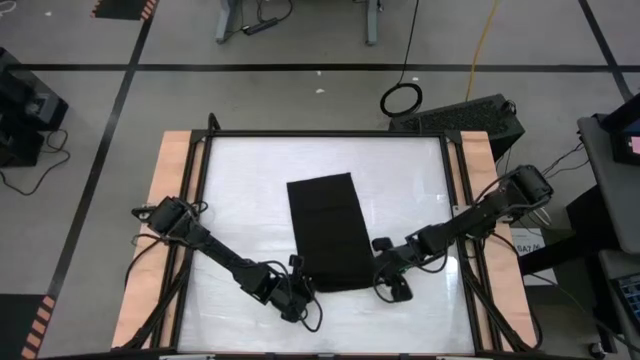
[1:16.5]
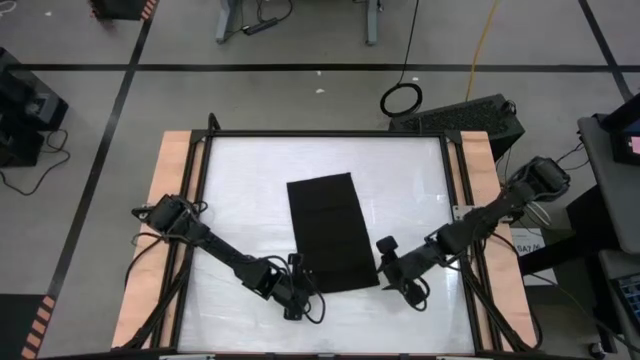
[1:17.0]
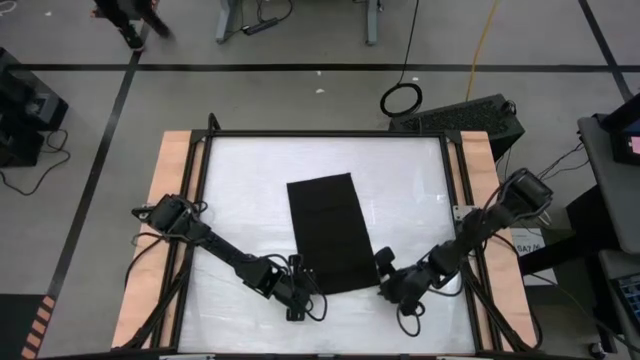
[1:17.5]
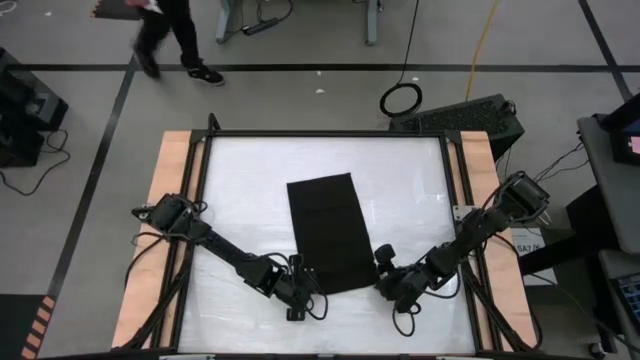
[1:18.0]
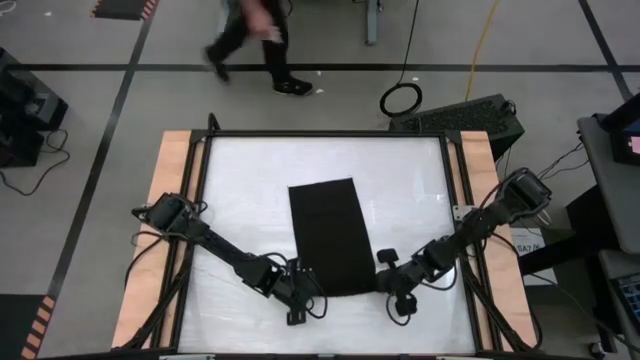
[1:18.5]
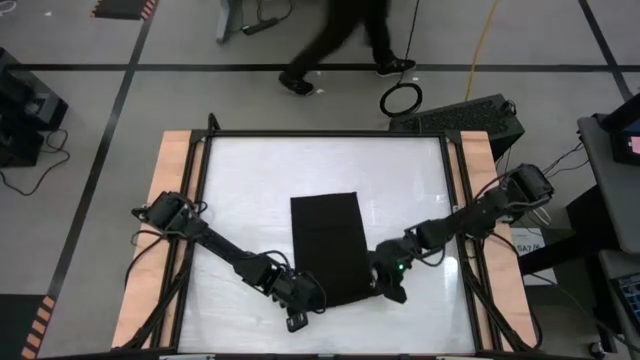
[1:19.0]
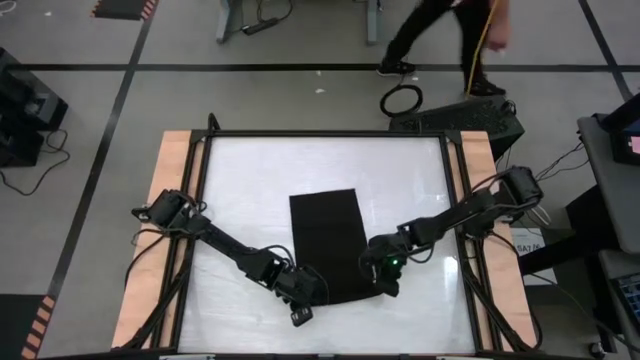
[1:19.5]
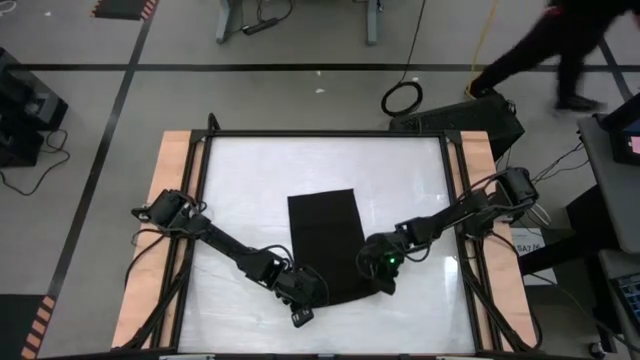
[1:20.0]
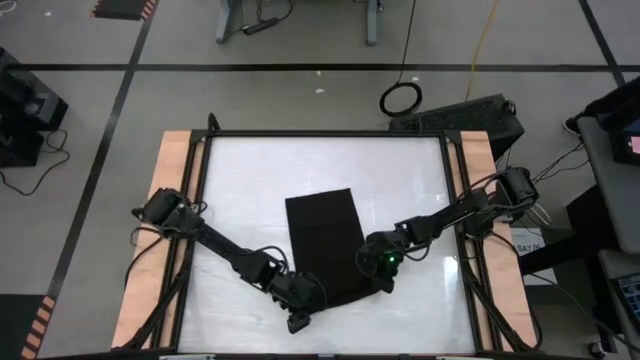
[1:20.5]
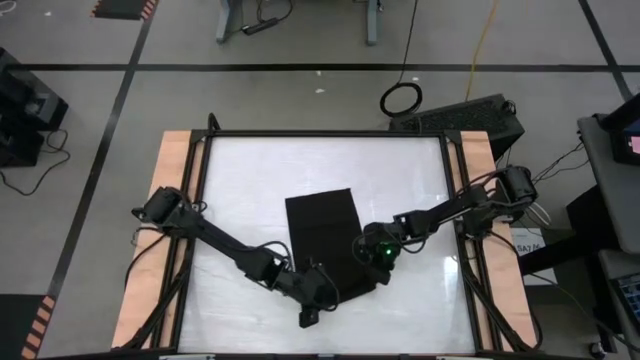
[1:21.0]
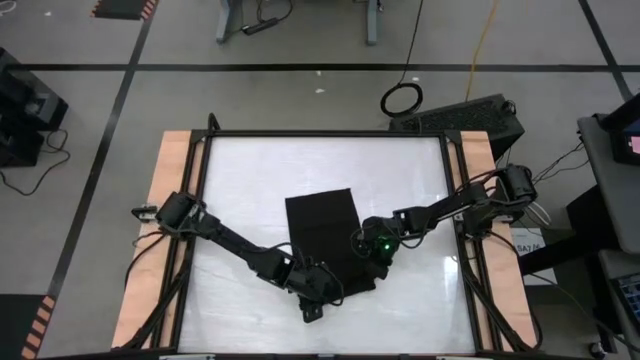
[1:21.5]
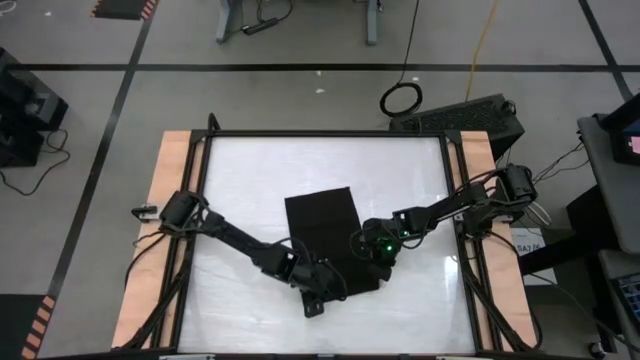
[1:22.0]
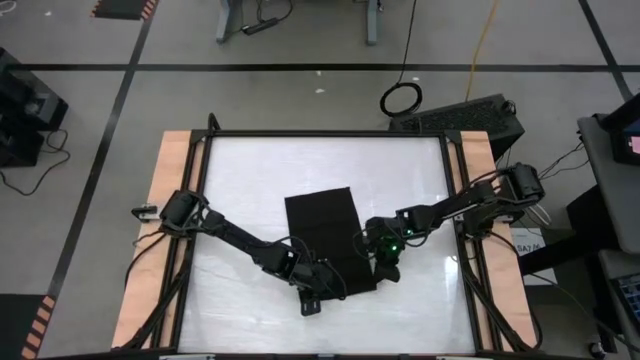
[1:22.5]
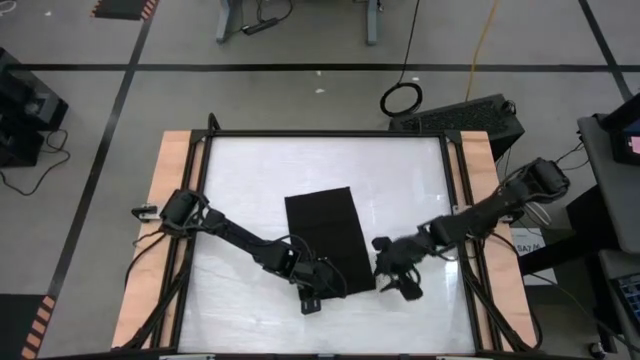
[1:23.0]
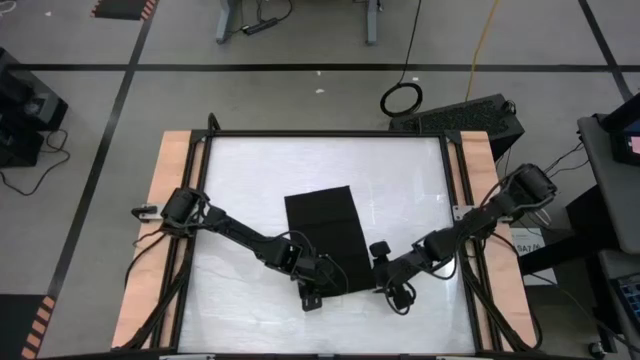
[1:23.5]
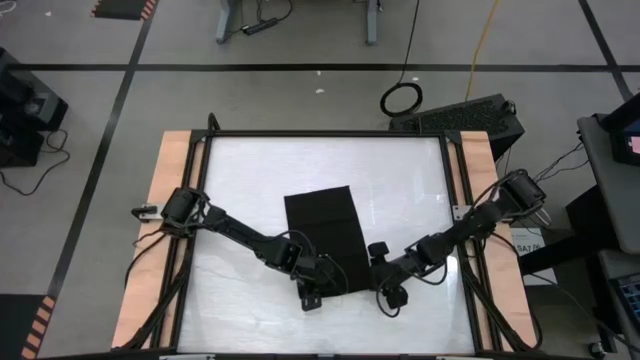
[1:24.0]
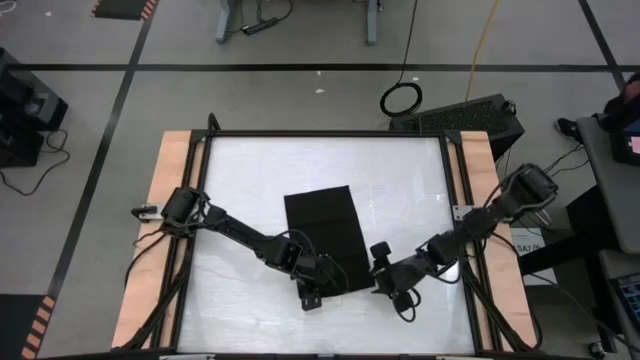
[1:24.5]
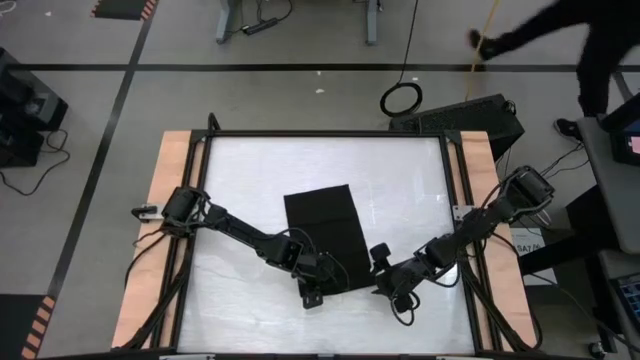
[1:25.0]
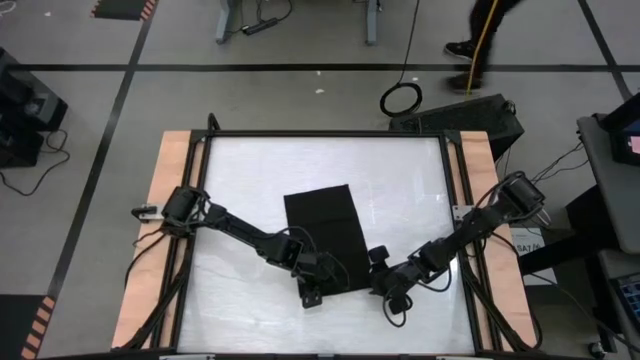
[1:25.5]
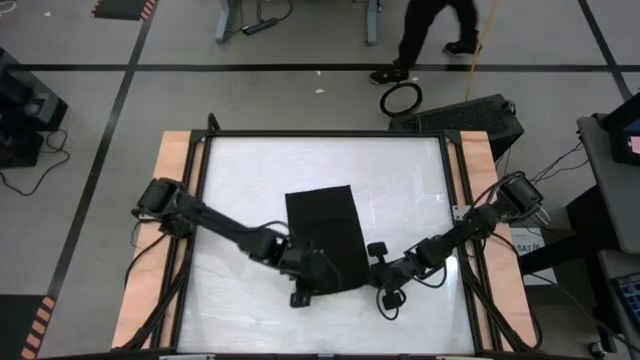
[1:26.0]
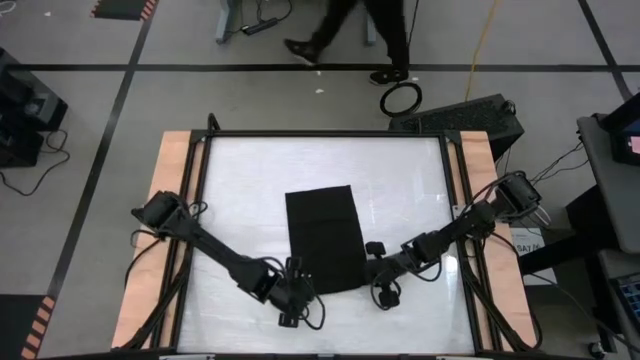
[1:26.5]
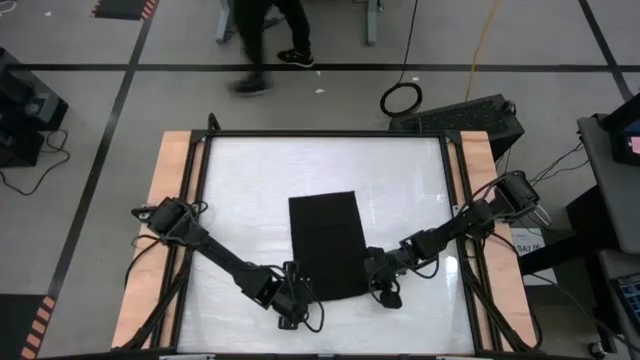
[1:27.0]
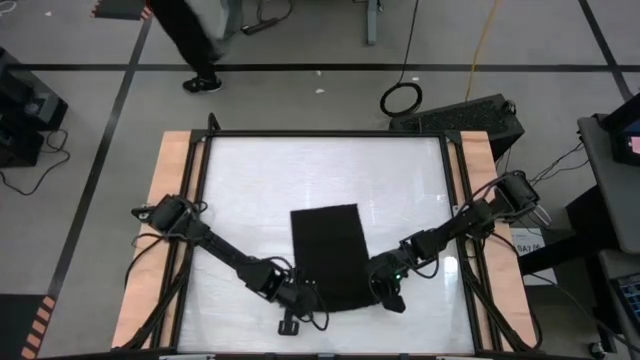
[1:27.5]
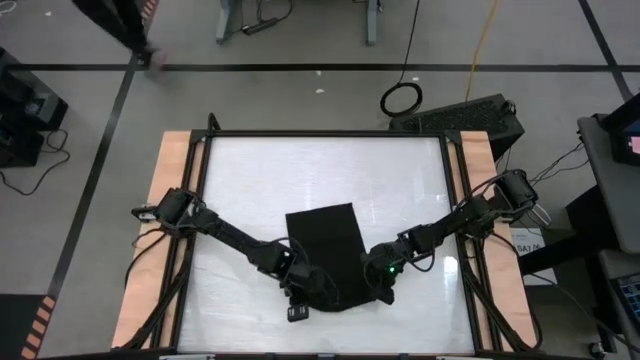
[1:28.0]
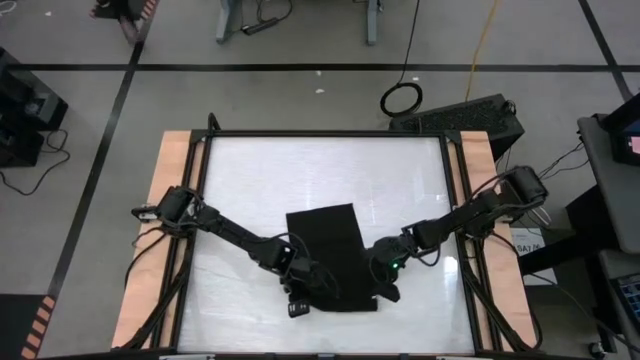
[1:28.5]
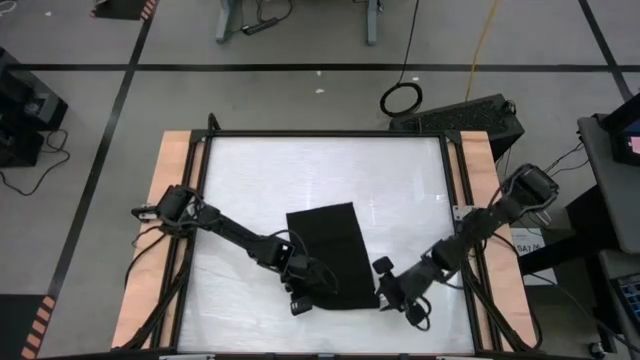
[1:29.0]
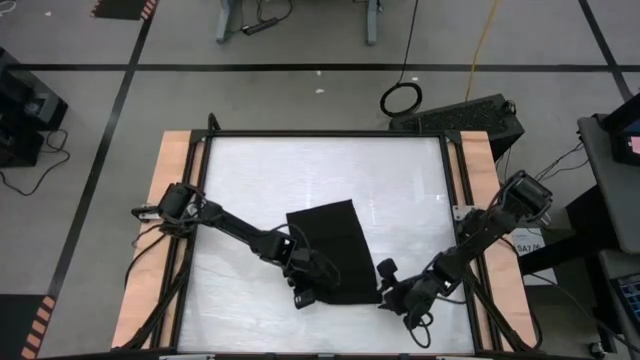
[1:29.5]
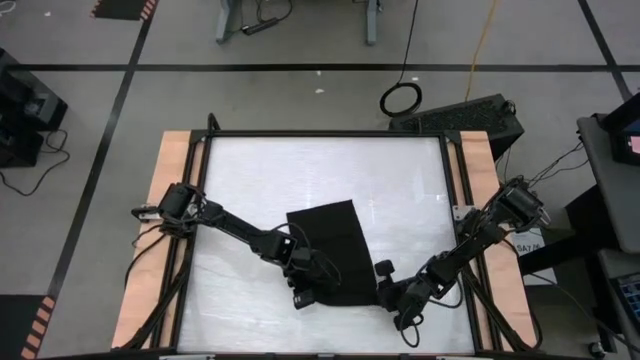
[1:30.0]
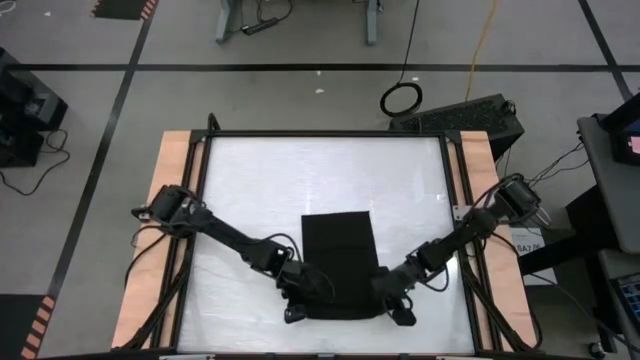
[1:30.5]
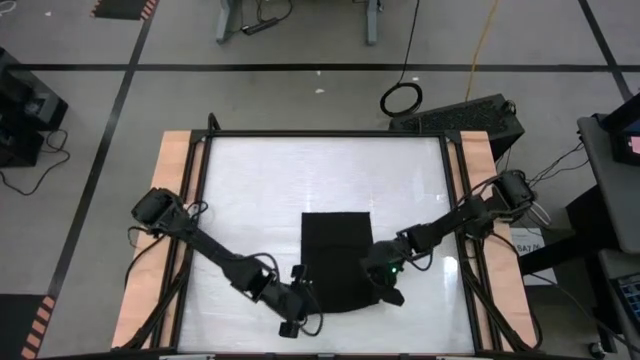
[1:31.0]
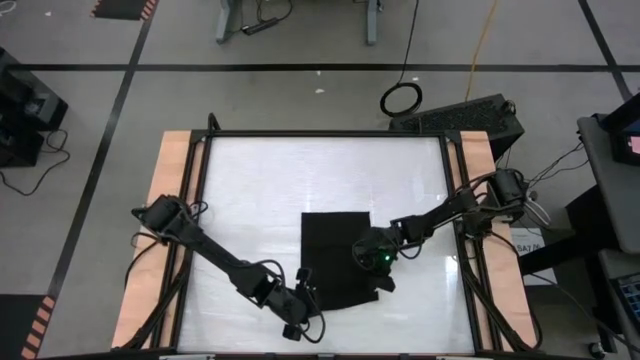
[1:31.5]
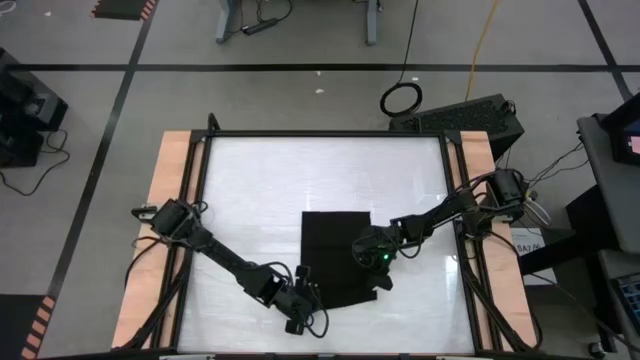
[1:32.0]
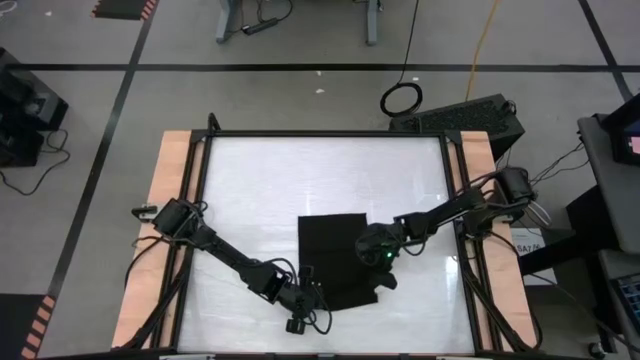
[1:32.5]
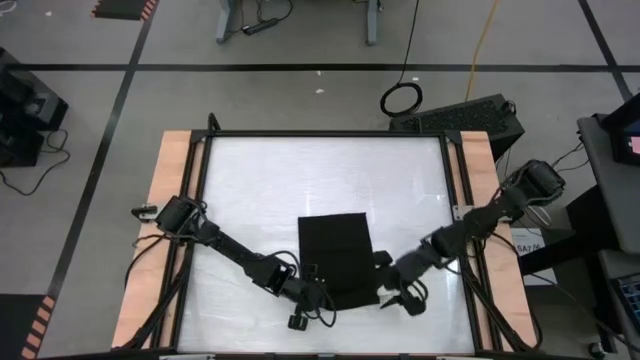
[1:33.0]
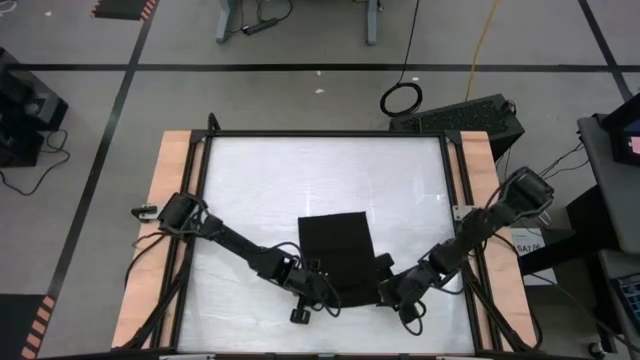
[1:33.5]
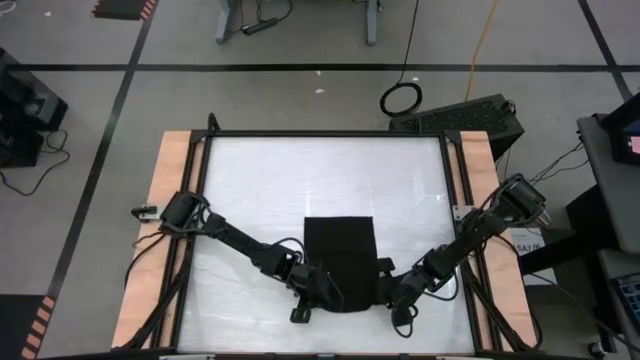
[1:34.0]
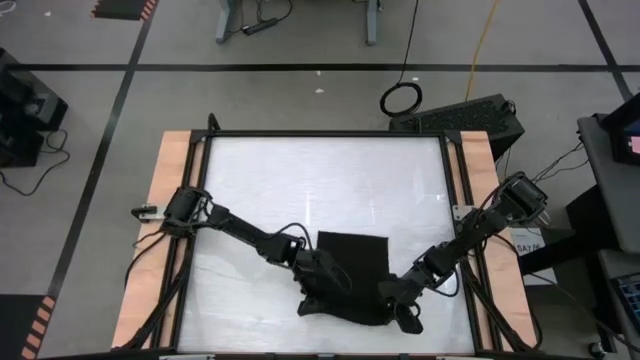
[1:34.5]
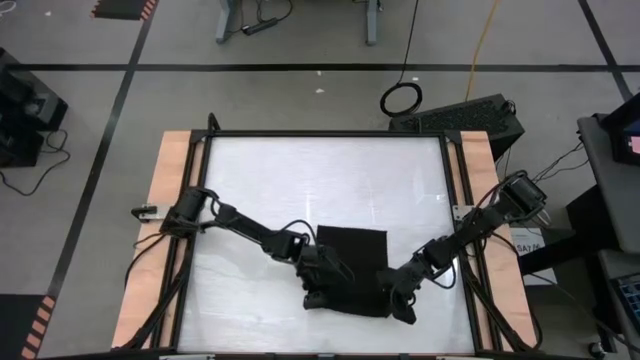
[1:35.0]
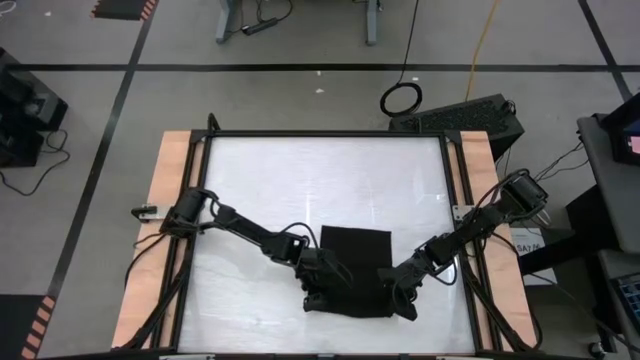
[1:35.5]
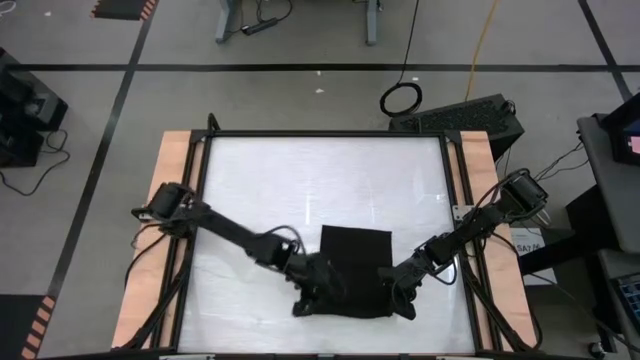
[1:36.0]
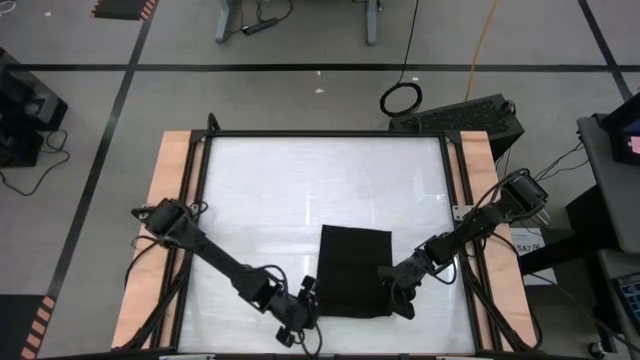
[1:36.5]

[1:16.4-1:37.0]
Task: Roll towel
Roll the towel
